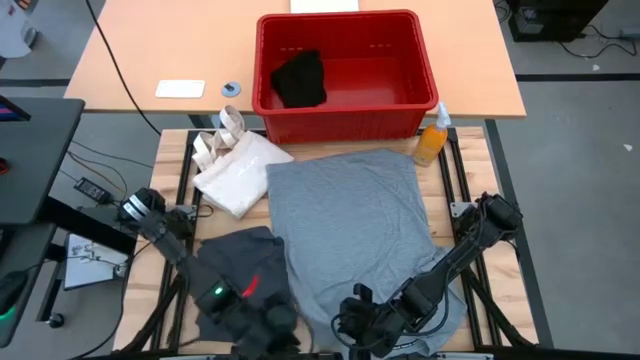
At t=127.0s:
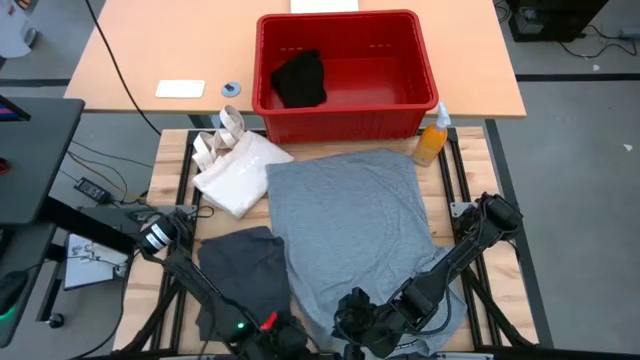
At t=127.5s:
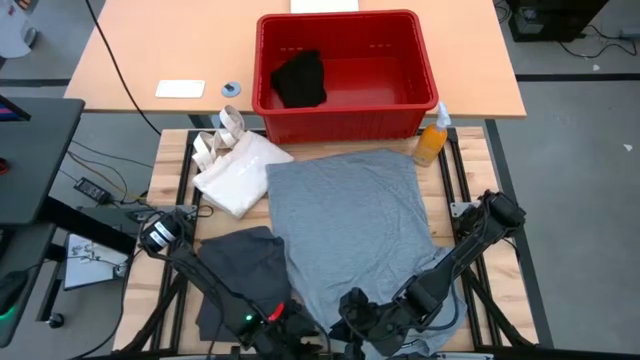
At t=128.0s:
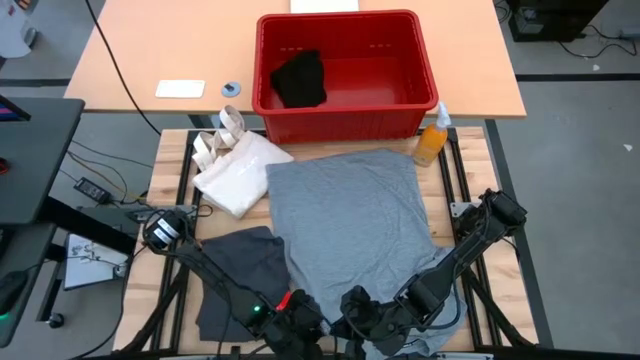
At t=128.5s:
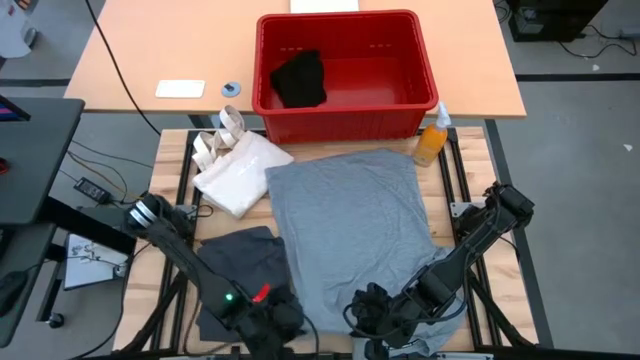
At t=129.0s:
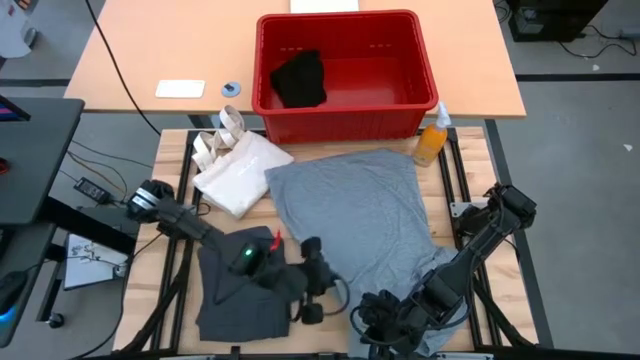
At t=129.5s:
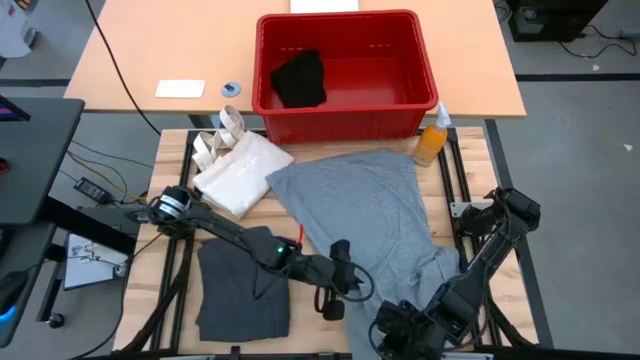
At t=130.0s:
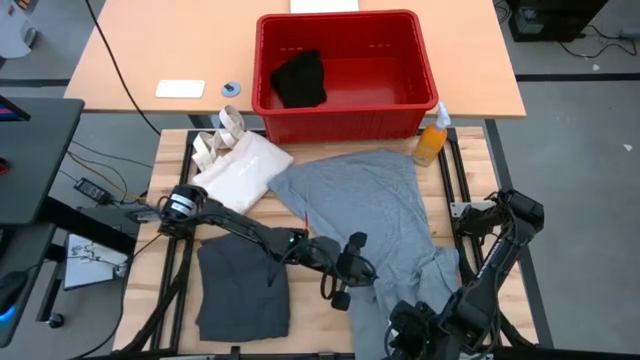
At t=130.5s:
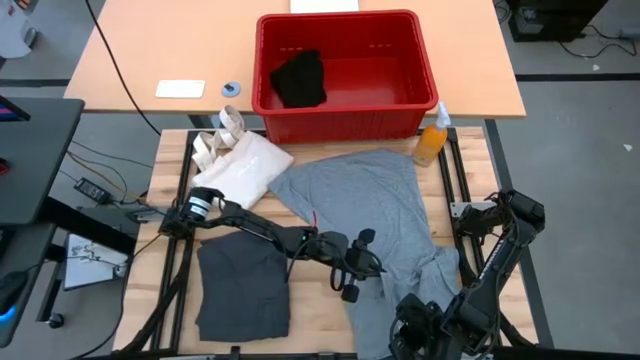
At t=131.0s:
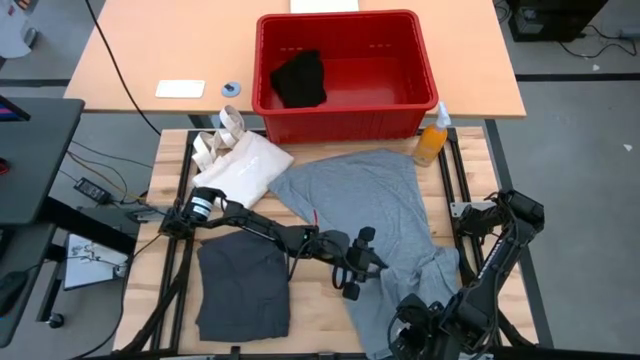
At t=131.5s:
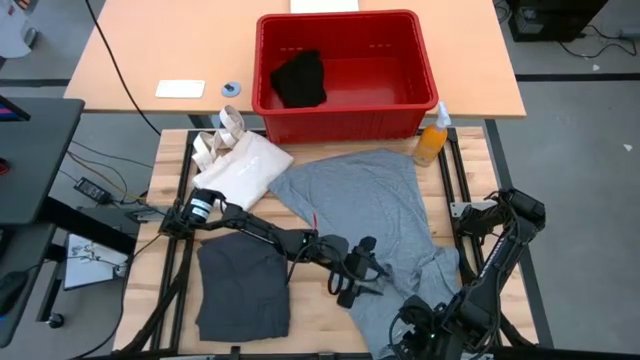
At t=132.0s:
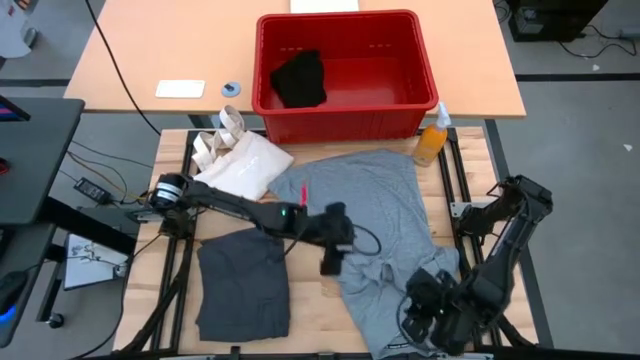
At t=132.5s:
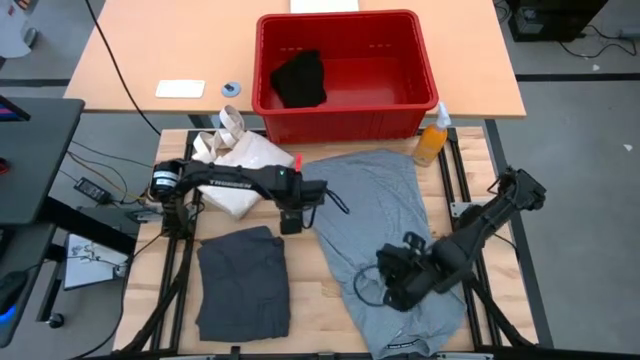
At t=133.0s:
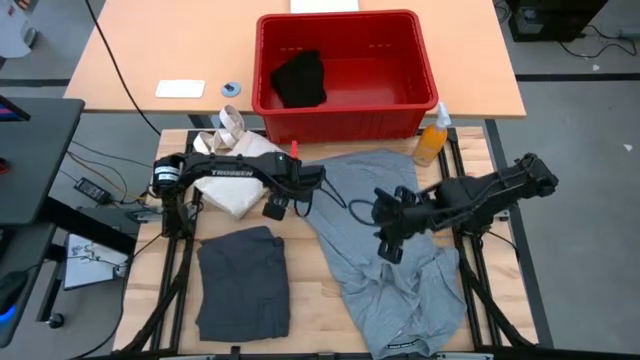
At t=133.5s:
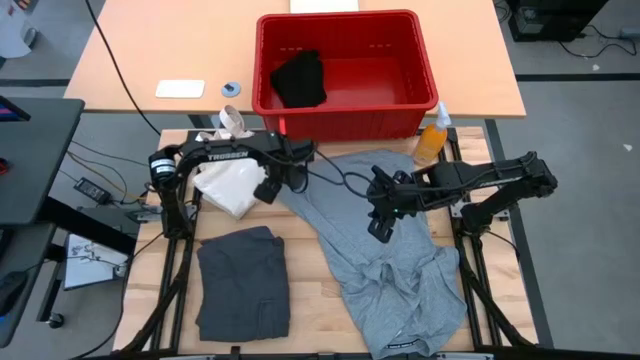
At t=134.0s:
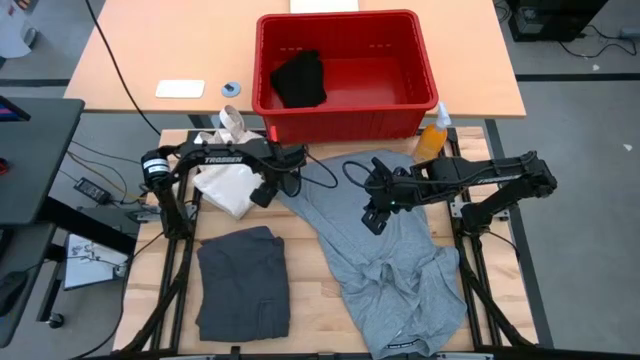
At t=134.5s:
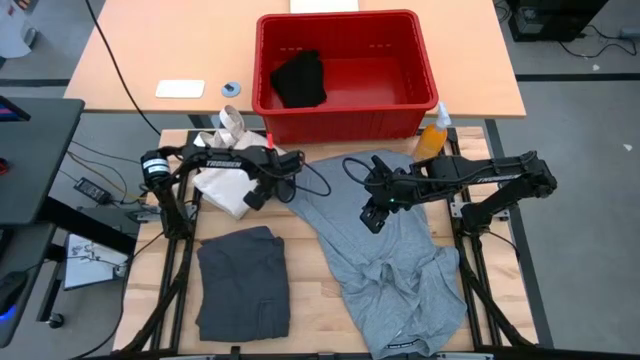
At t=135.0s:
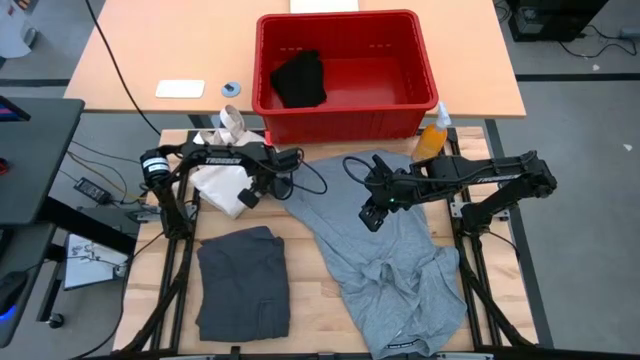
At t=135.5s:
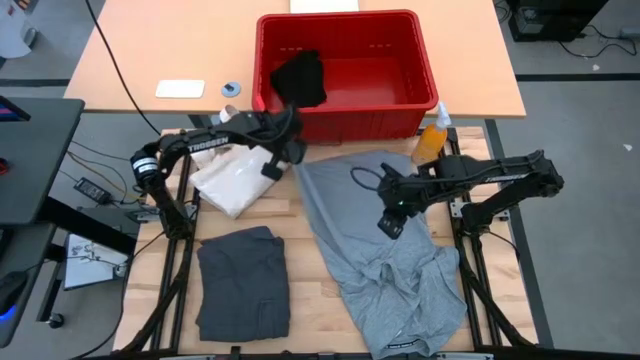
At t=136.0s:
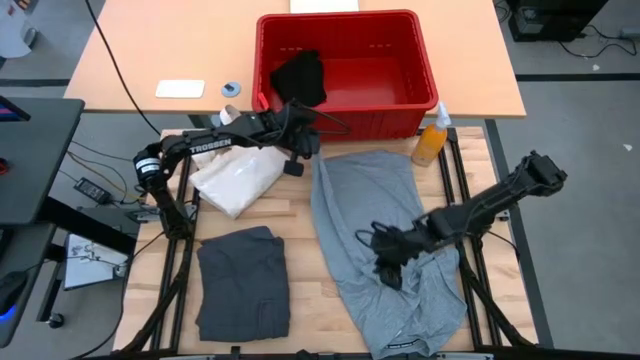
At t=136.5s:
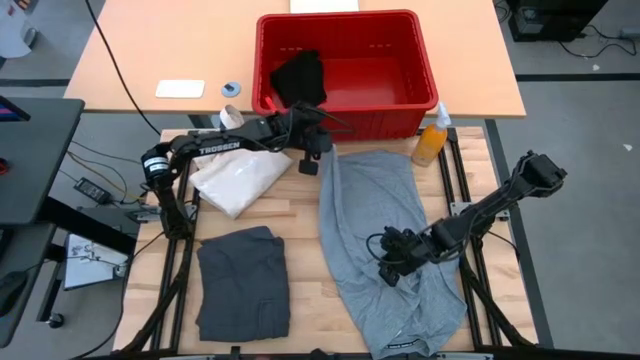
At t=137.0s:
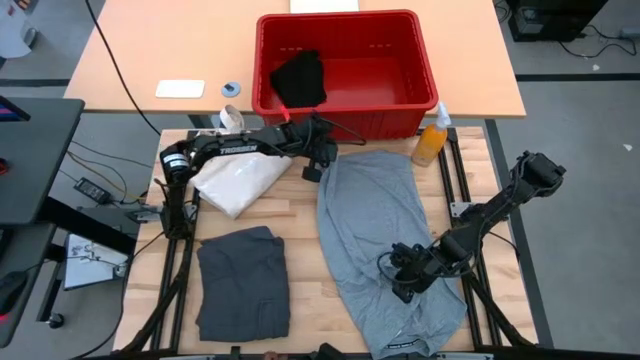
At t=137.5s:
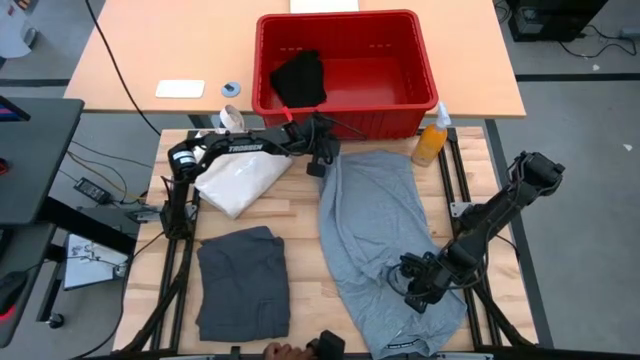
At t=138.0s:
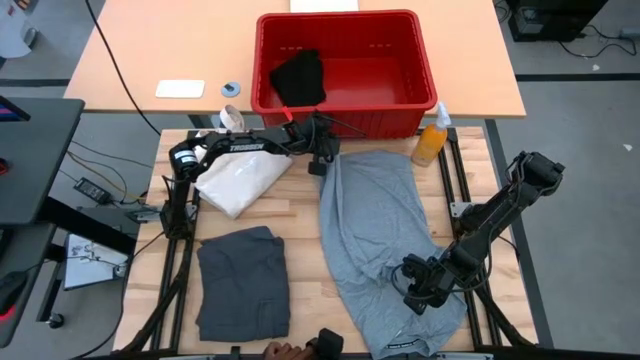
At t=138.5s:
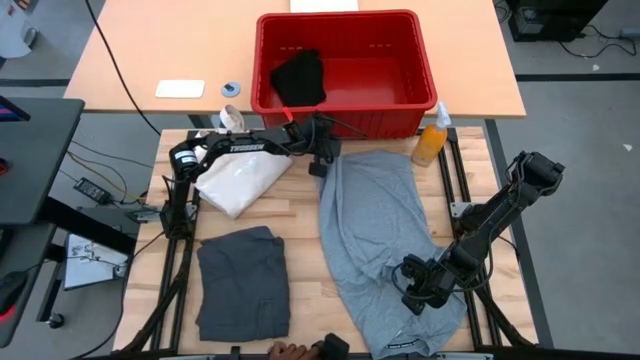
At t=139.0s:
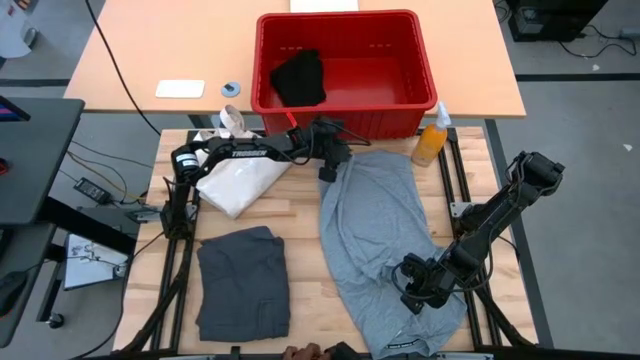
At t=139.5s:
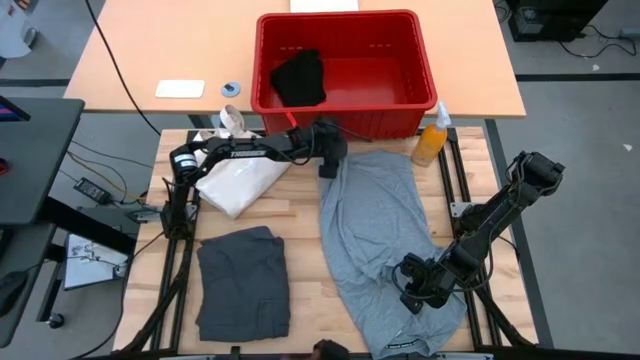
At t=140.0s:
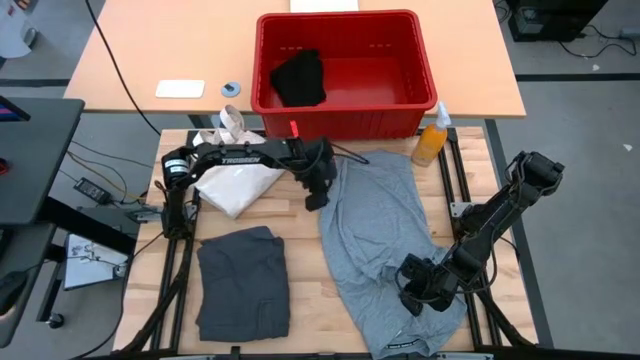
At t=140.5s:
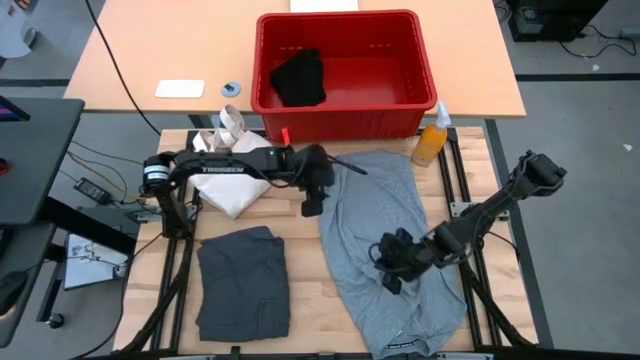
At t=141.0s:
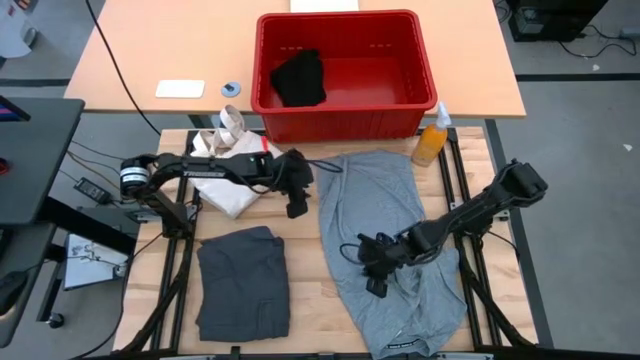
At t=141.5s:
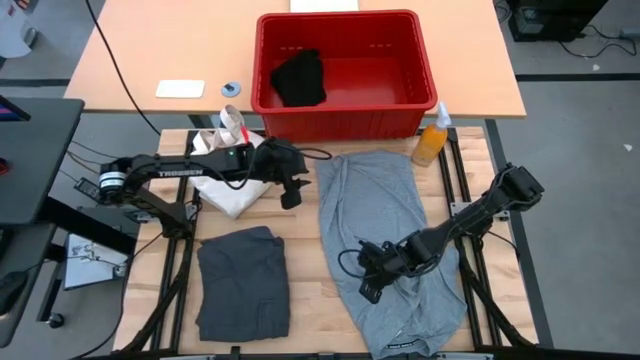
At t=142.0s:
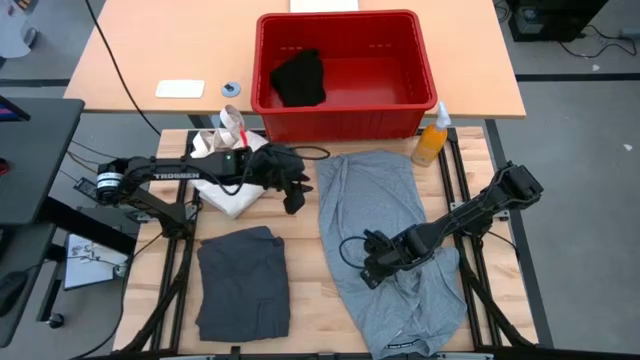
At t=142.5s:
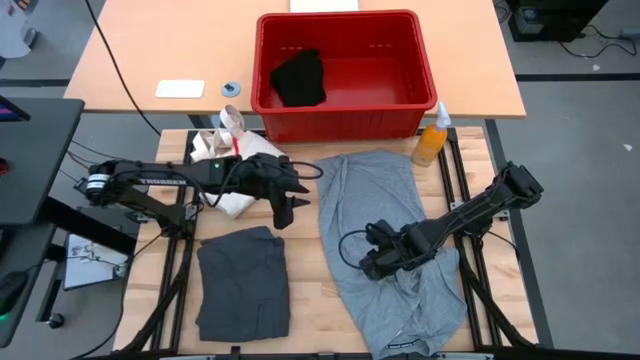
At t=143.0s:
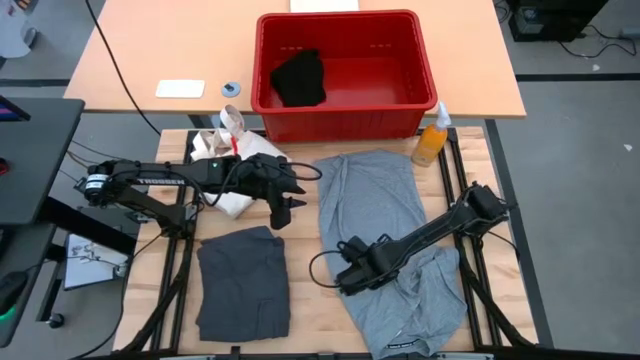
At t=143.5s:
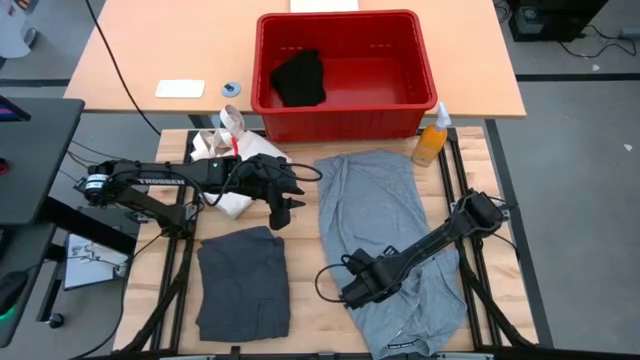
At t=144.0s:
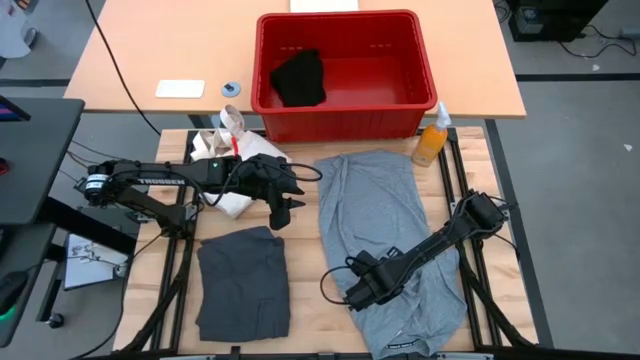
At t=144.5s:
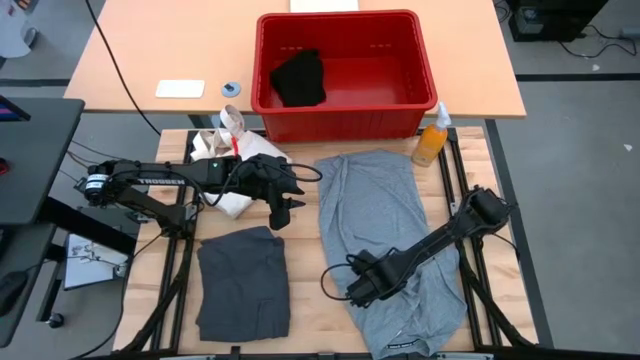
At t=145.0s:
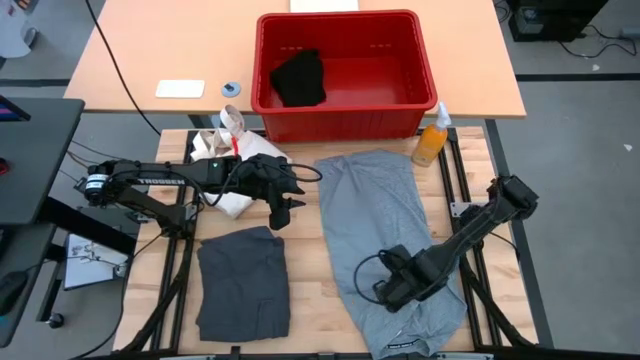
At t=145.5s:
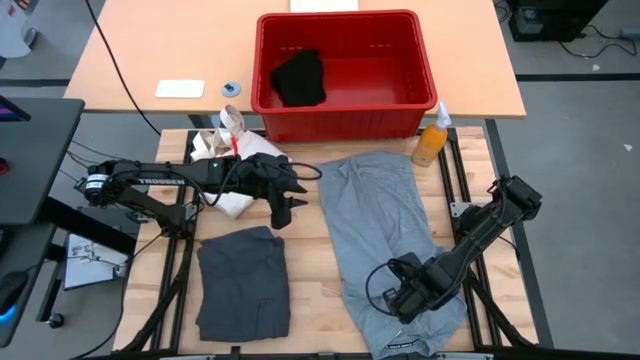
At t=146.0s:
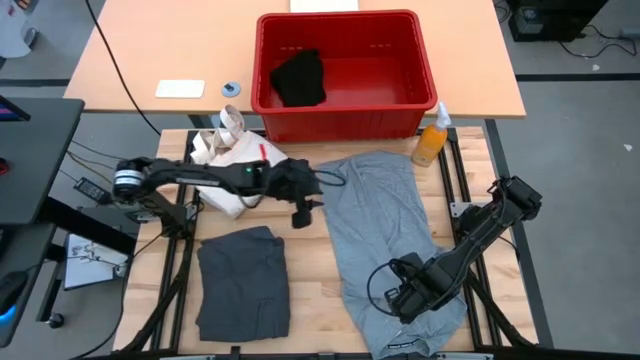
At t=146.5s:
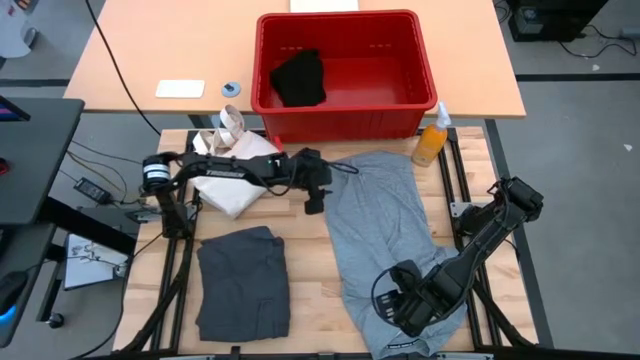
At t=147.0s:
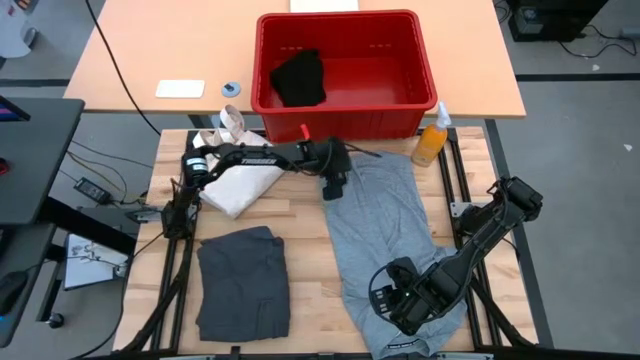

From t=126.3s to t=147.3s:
Task: Fold Laundry from Bin
Fold the light gray t-shirt
